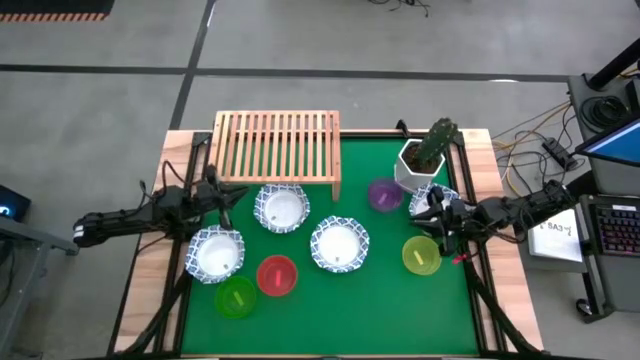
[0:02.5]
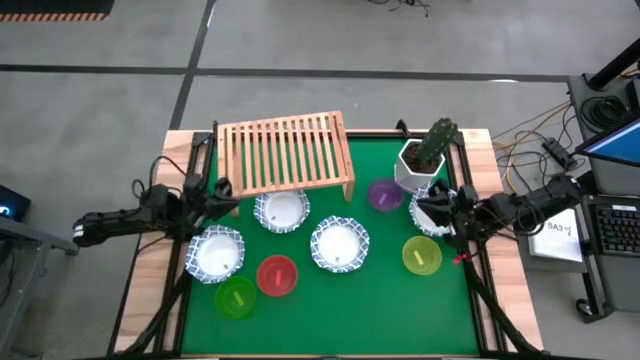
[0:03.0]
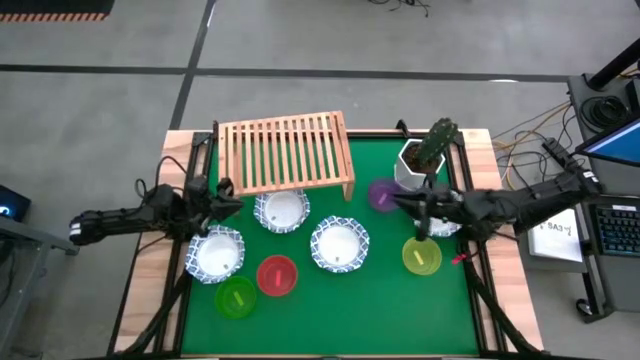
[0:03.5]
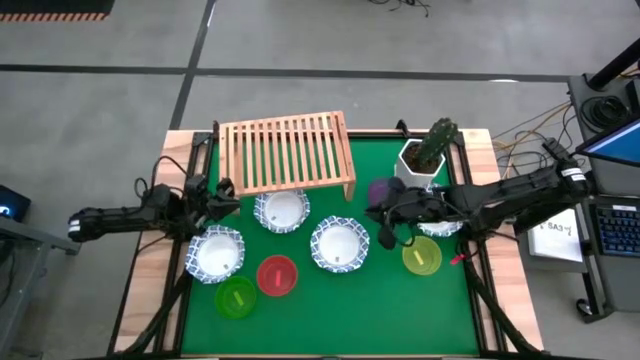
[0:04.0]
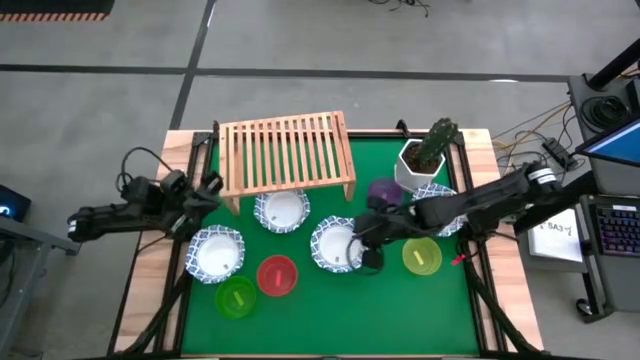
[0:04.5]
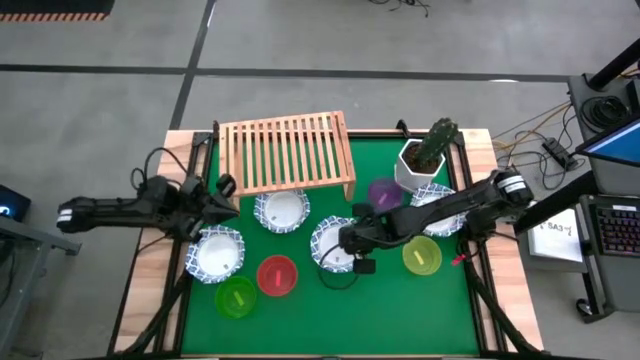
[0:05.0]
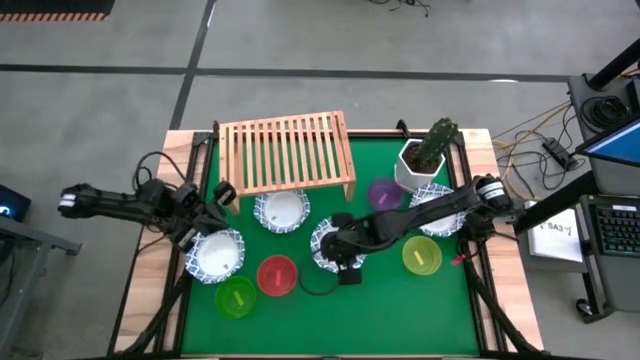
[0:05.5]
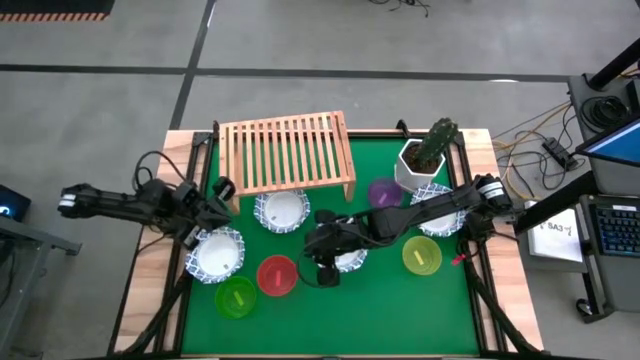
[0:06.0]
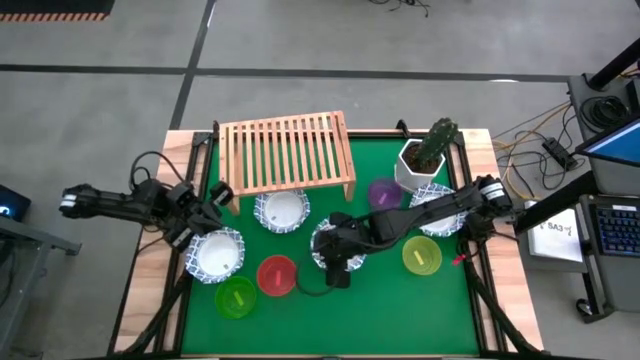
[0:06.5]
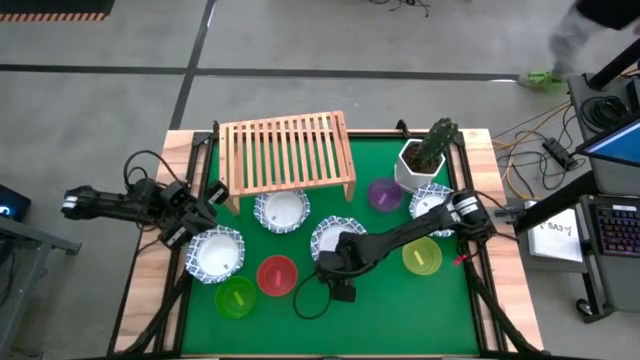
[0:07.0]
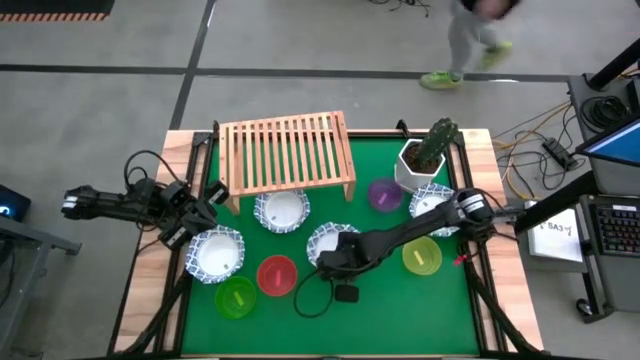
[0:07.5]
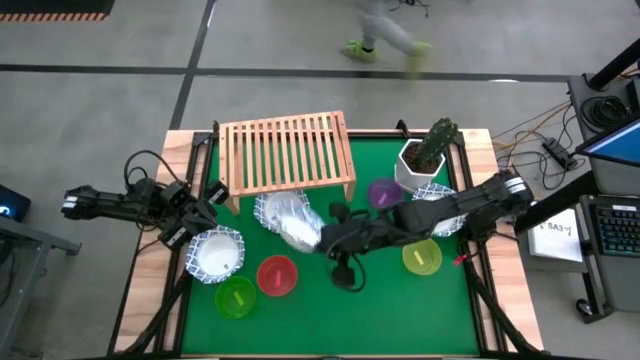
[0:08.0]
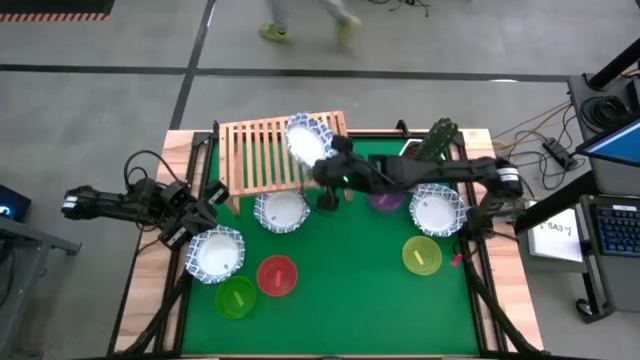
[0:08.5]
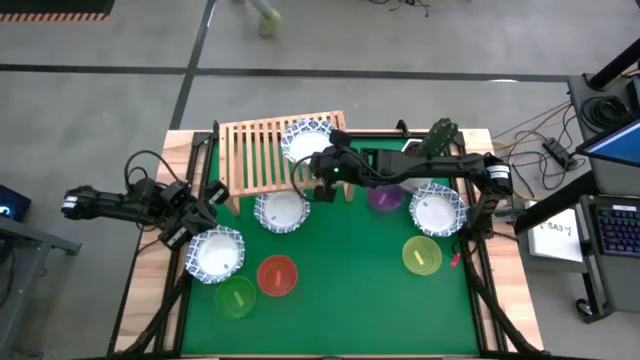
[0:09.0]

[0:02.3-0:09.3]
Task: Place and stack bowls onto a shelf
Put the center white blue bowl on the shelf

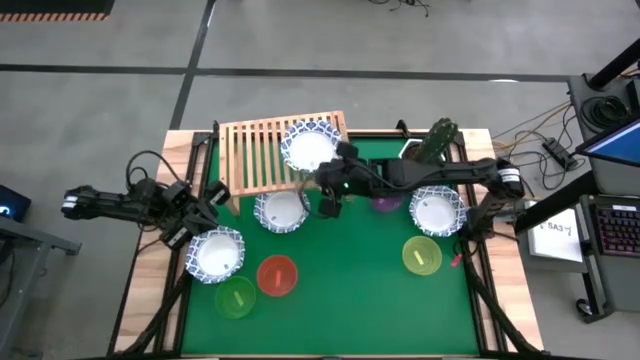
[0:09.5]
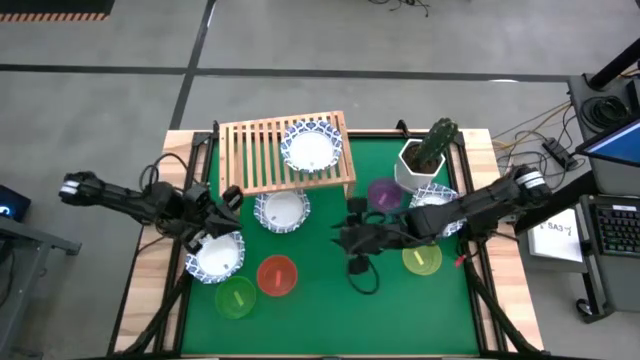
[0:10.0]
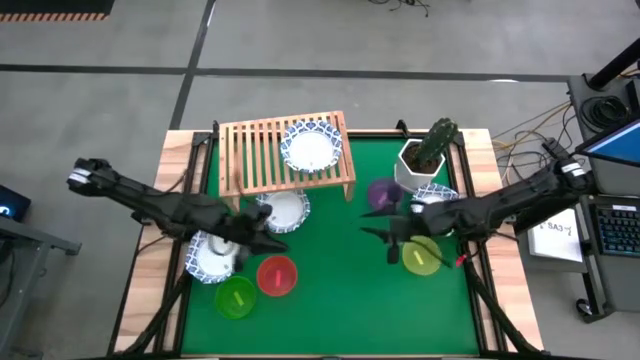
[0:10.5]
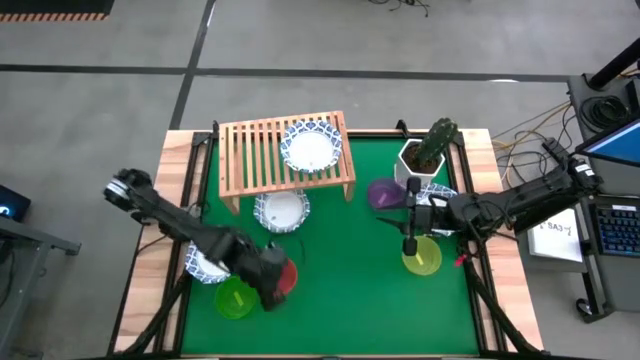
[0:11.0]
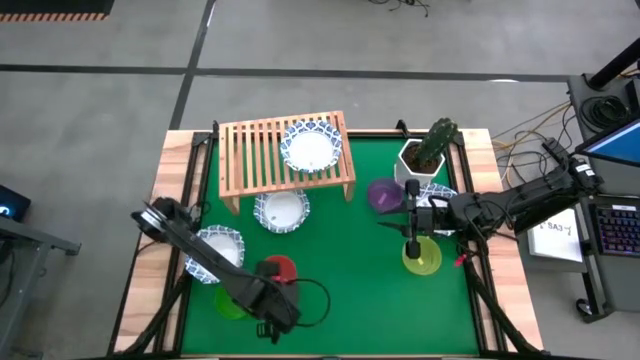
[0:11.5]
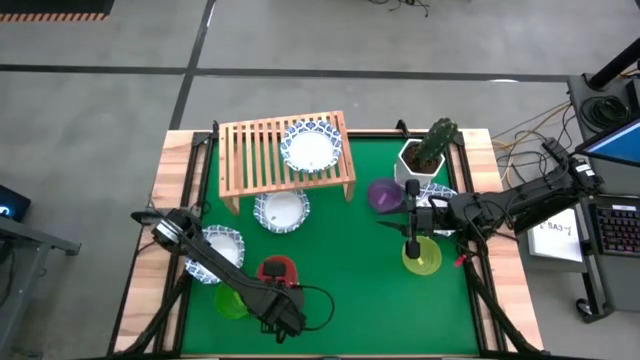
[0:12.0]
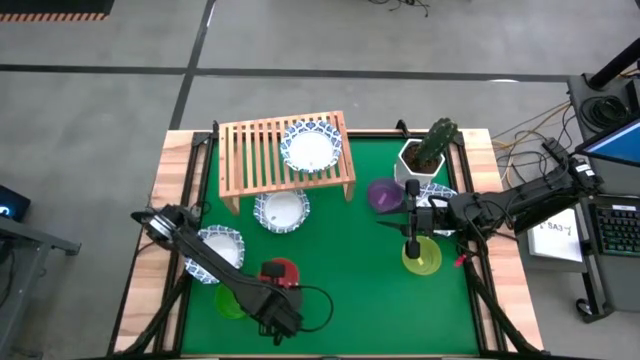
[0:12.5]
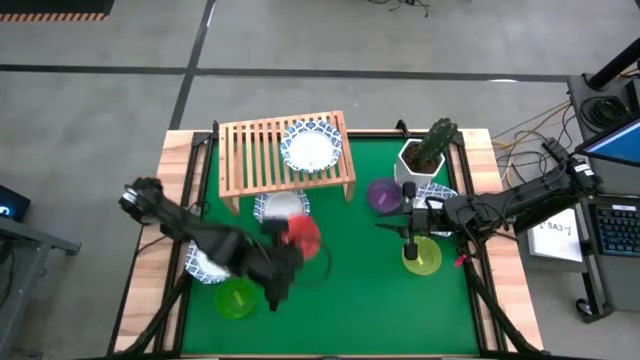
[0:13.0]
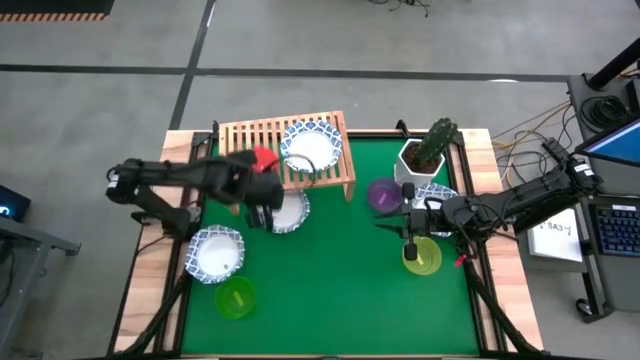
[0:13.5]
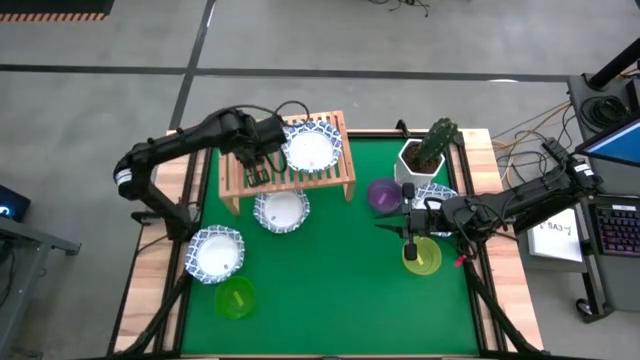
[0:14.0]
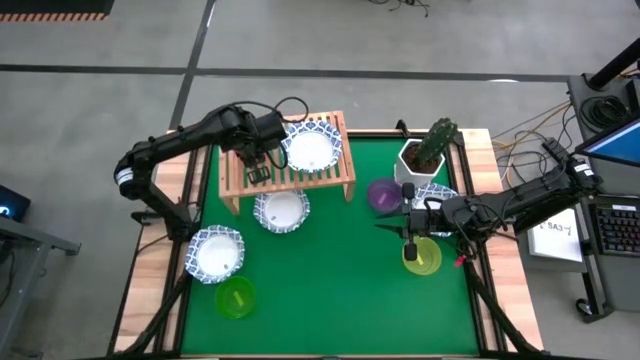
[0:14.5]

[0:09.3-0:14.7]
Put the red bowl on the shelf

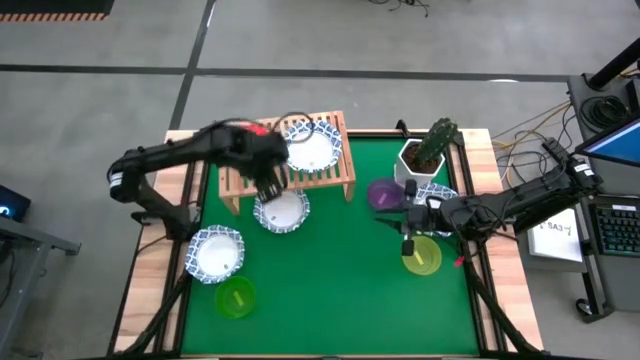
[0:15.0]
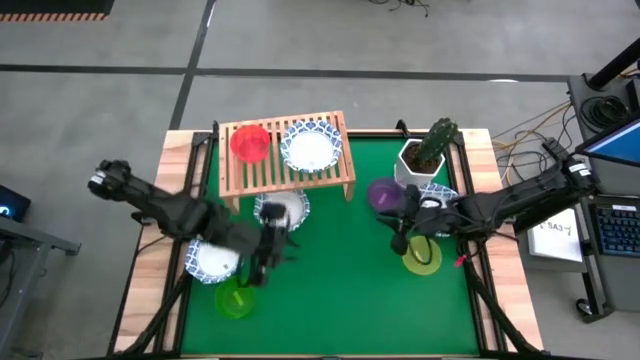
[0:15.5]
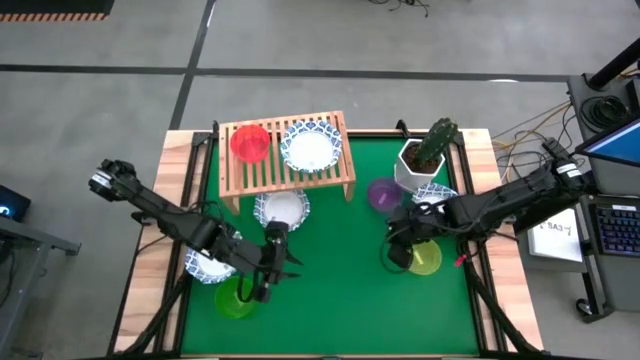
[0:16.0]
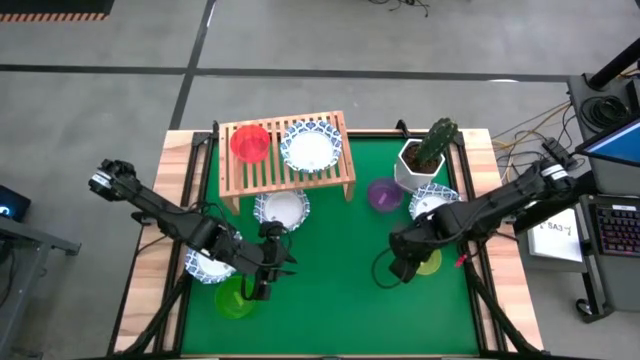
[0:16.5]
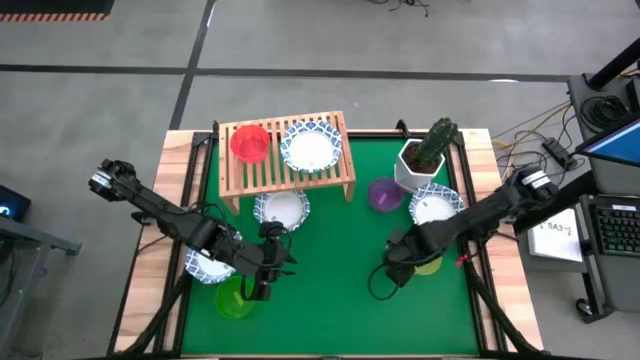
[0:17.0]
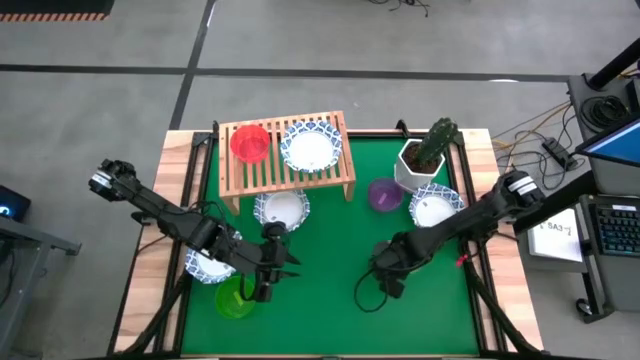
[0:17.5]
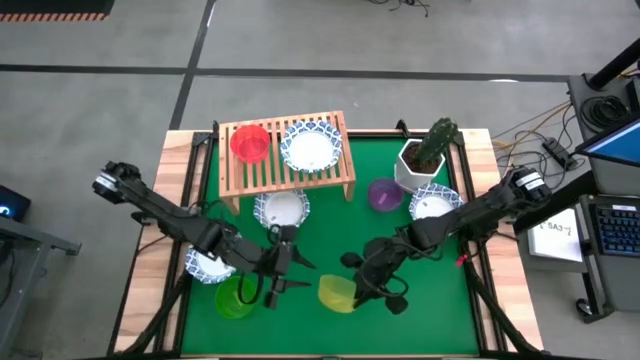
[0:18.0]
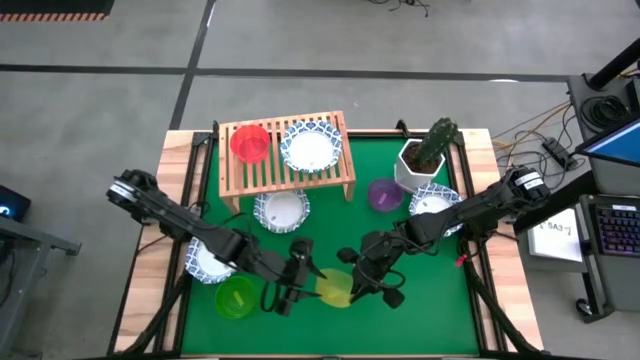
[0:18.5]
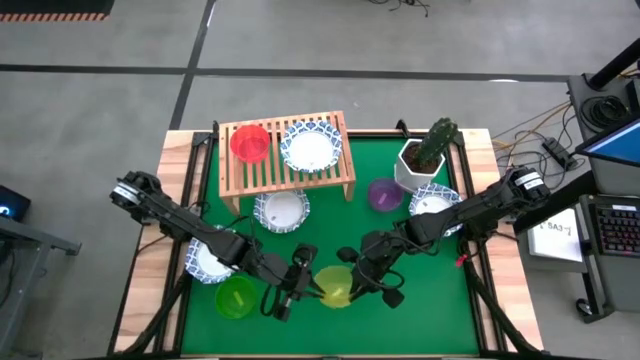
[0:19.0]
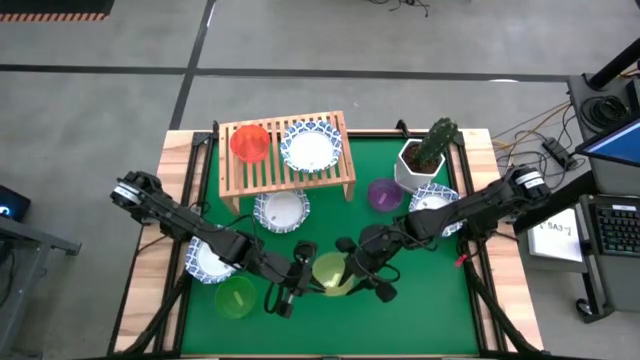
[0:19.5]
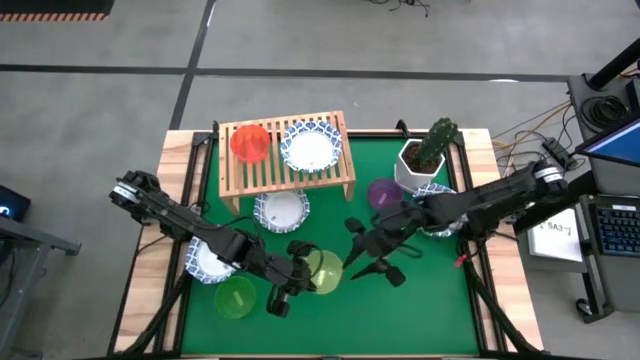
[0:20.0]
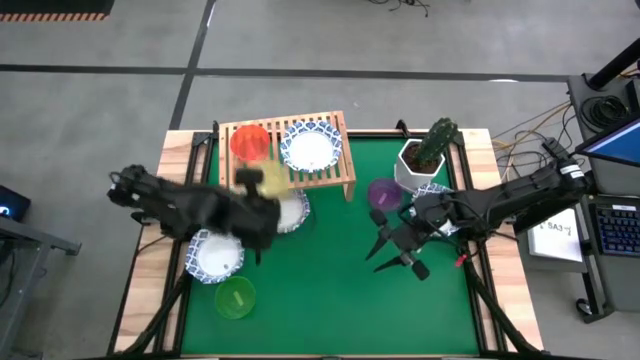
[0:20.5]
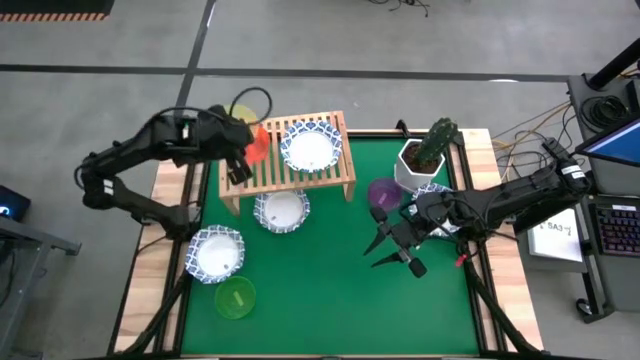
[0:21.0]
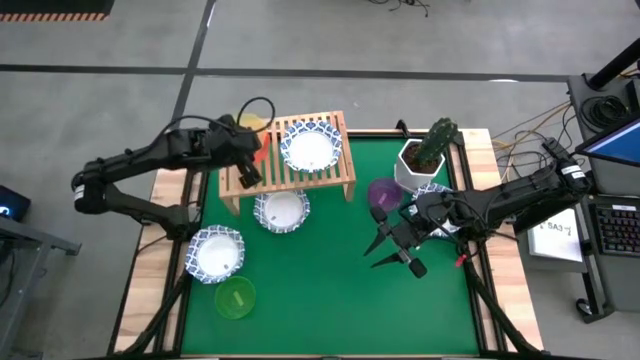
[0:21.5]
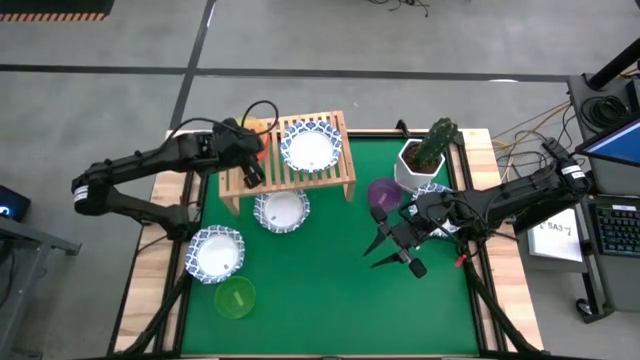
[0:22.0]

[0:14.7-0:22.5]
Stack the yellow bowl on top of the red bowl on the shelf

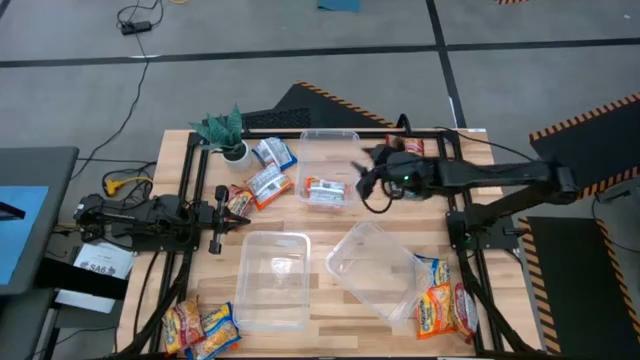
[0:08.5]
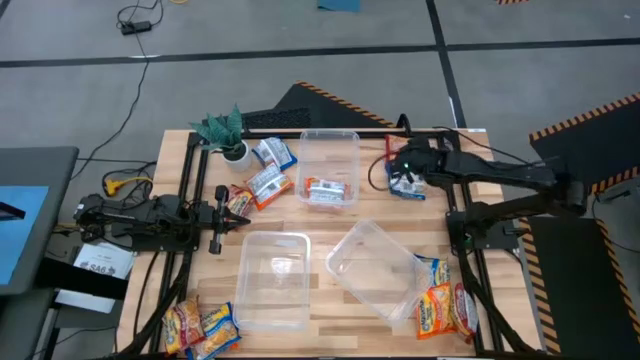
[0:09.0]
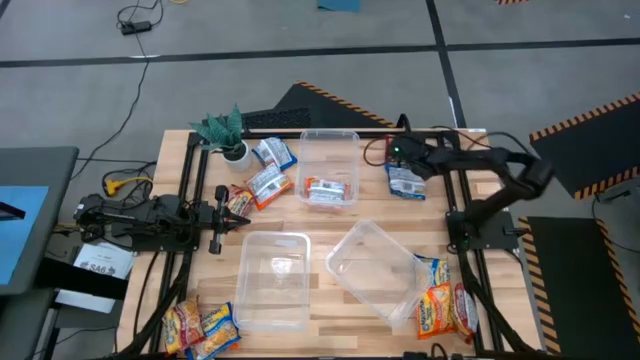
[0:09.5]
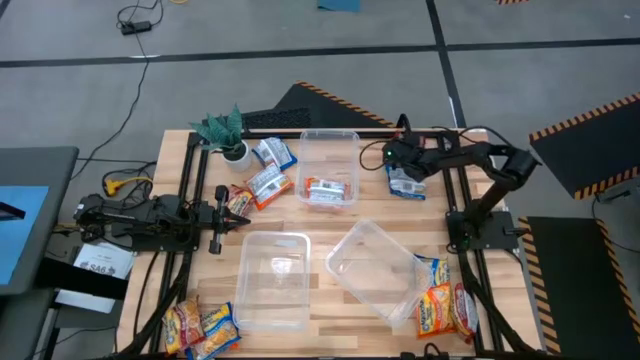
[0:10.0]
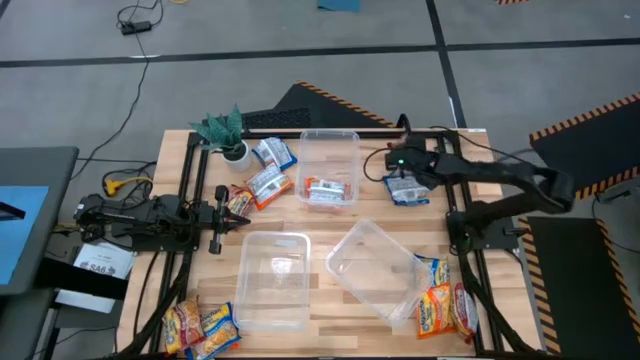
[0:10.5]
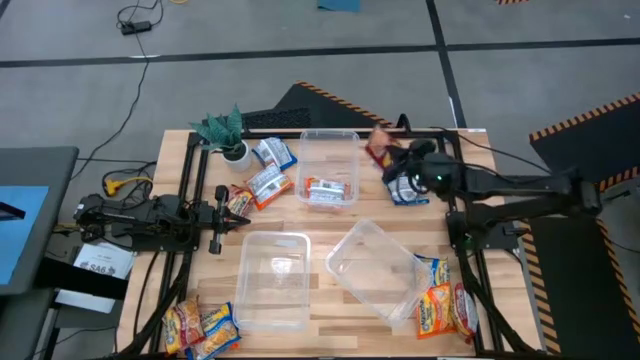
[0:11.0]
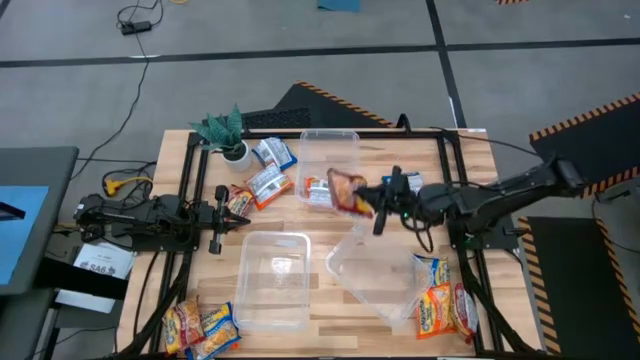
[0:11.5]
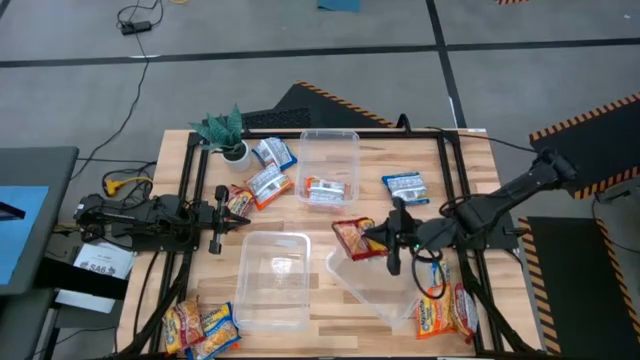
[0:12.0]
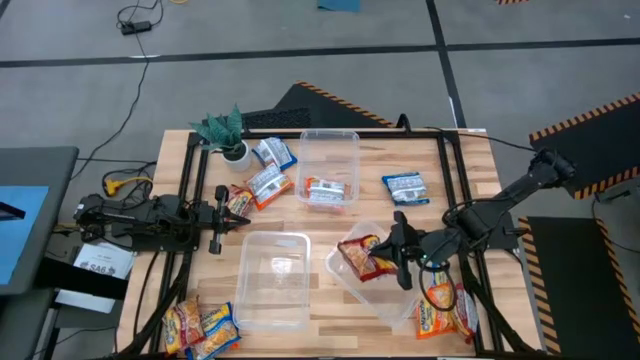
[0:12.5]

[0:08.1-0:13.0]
Task: Sort Maruchan noodles
Put the red noodle pack into the bottom right transparent bin
